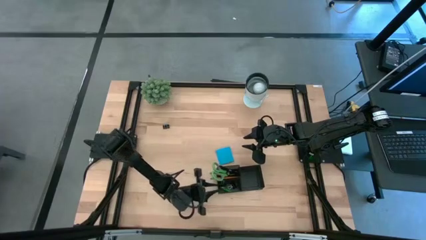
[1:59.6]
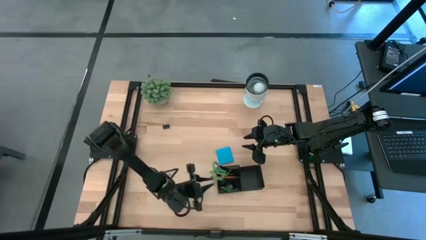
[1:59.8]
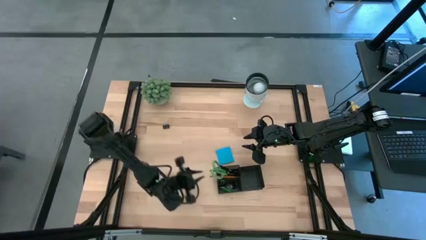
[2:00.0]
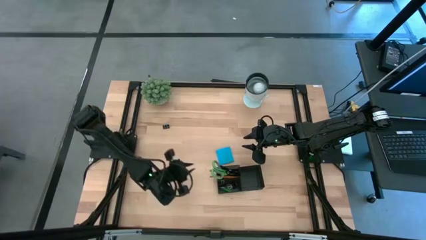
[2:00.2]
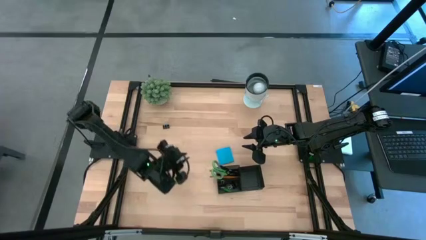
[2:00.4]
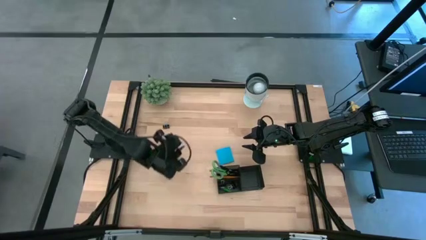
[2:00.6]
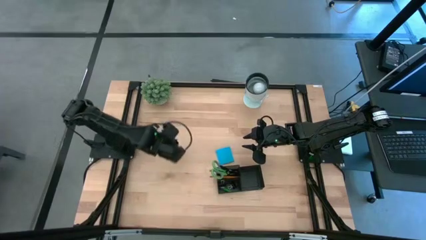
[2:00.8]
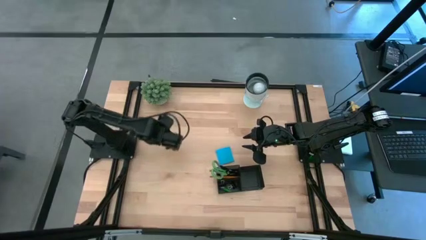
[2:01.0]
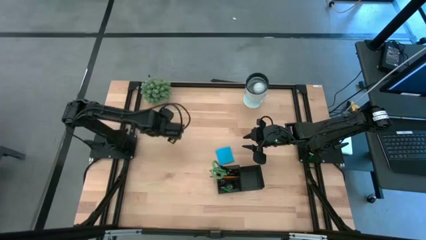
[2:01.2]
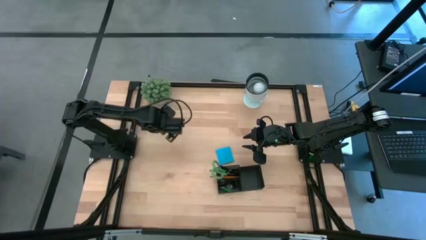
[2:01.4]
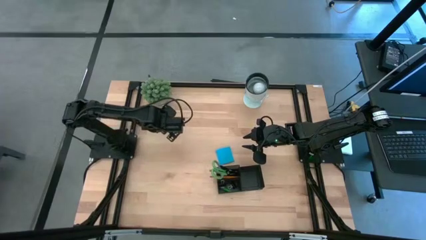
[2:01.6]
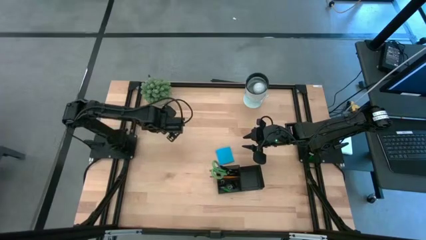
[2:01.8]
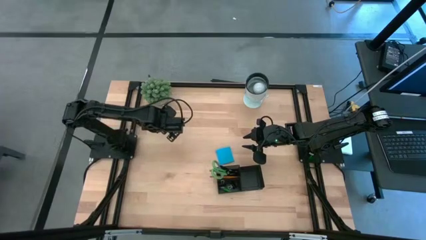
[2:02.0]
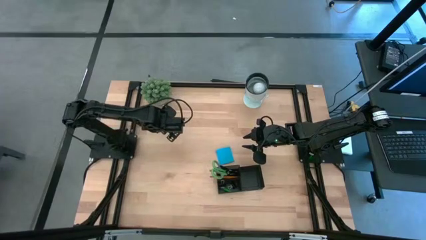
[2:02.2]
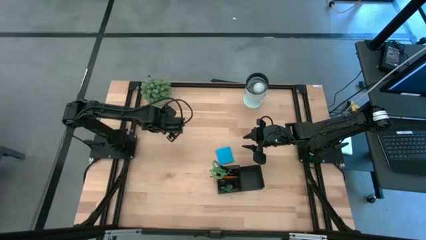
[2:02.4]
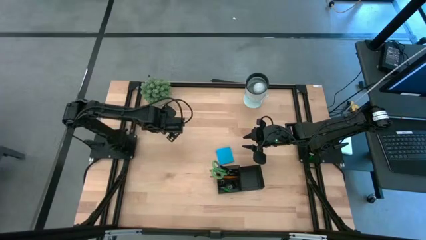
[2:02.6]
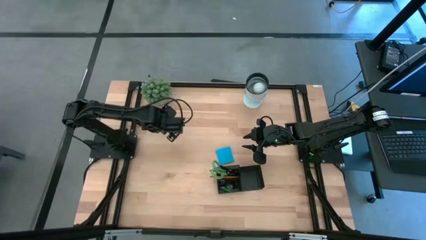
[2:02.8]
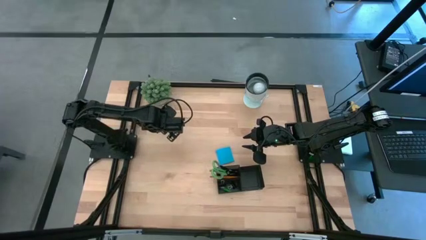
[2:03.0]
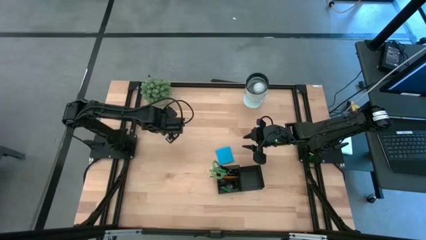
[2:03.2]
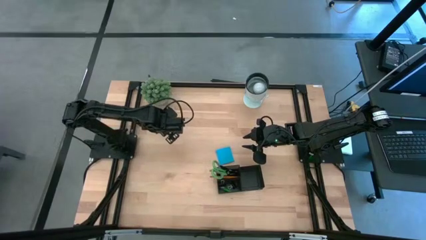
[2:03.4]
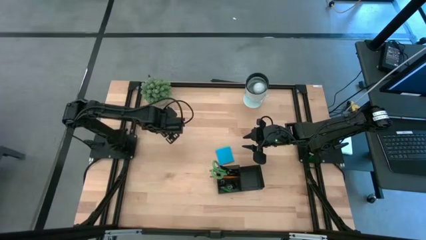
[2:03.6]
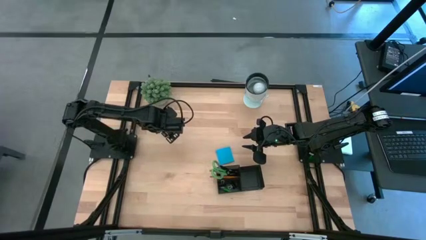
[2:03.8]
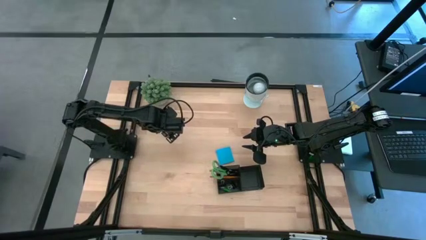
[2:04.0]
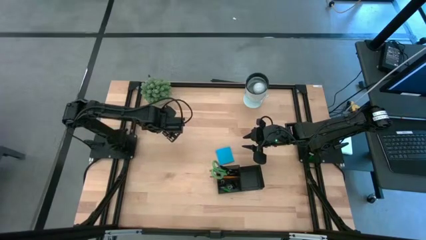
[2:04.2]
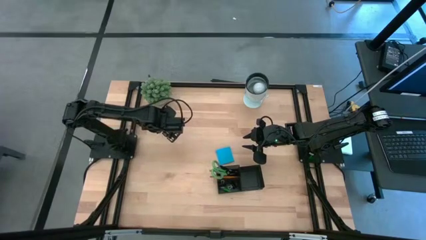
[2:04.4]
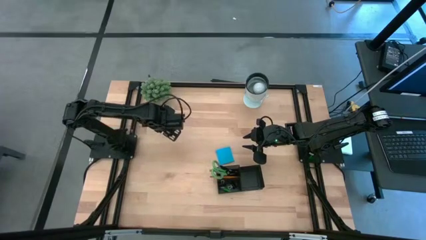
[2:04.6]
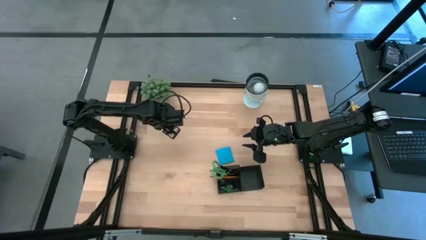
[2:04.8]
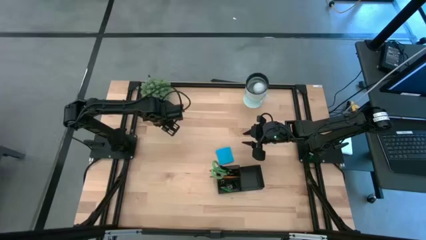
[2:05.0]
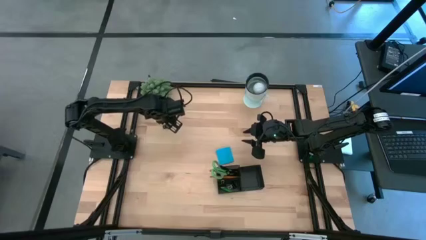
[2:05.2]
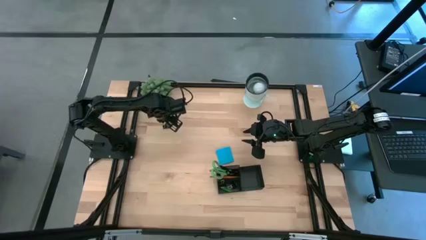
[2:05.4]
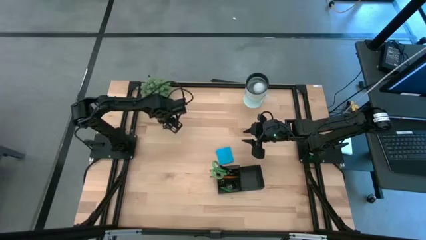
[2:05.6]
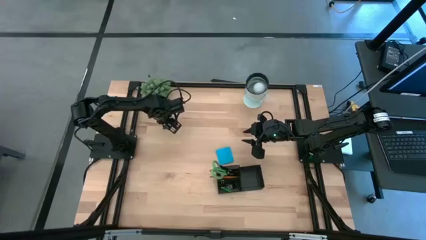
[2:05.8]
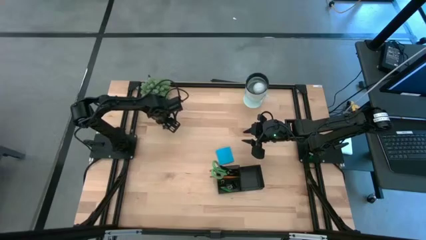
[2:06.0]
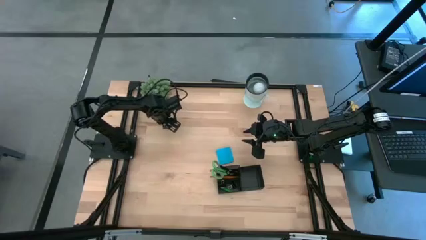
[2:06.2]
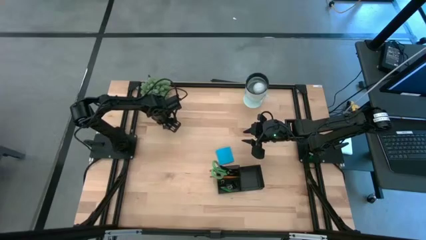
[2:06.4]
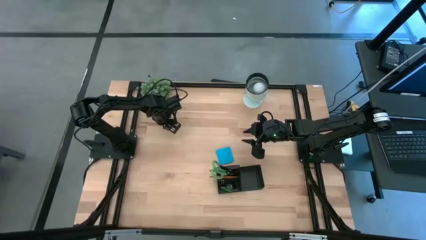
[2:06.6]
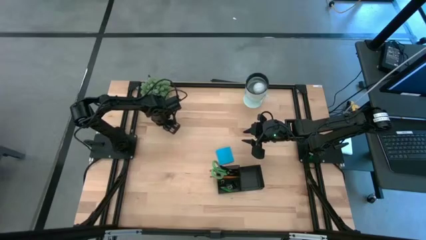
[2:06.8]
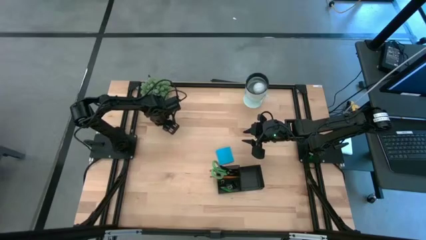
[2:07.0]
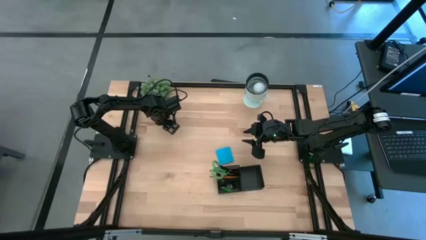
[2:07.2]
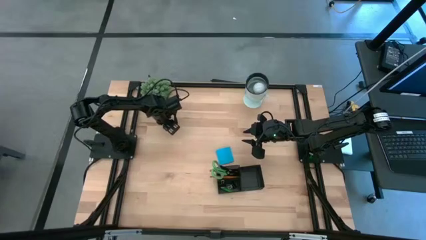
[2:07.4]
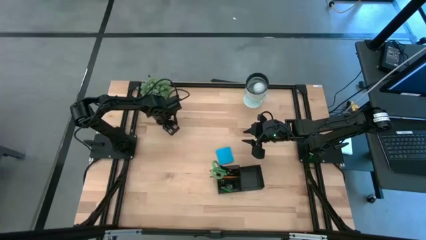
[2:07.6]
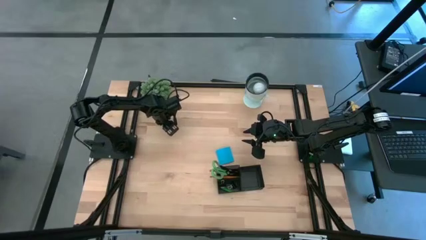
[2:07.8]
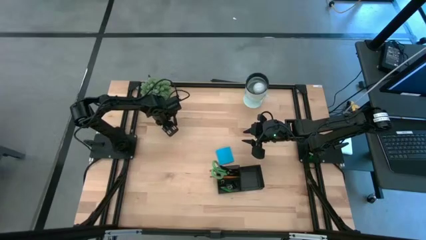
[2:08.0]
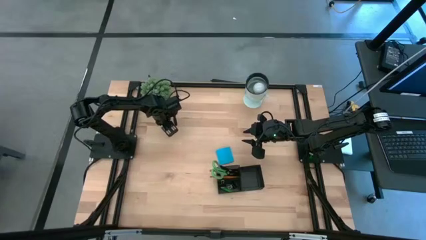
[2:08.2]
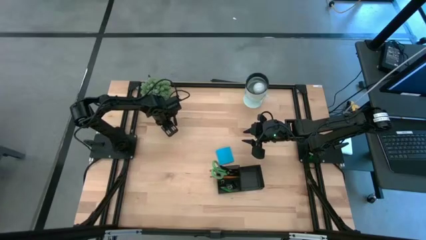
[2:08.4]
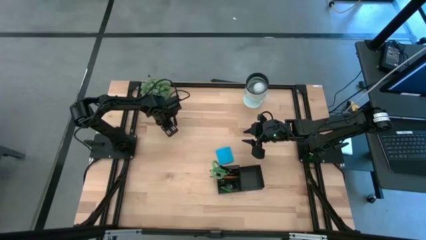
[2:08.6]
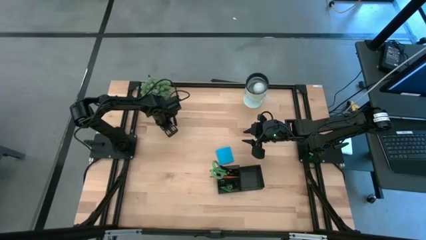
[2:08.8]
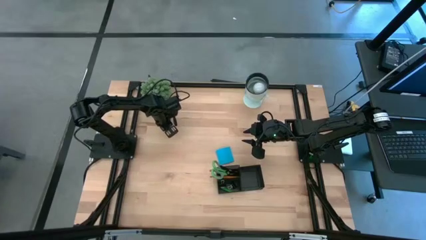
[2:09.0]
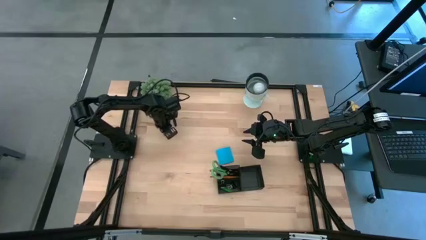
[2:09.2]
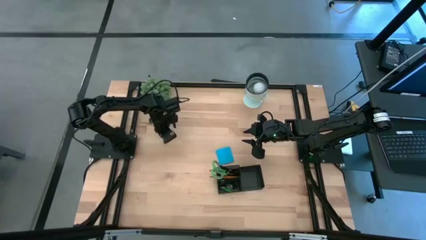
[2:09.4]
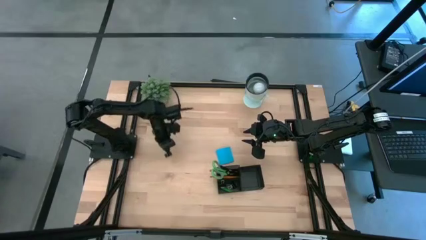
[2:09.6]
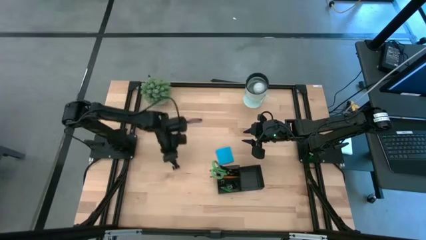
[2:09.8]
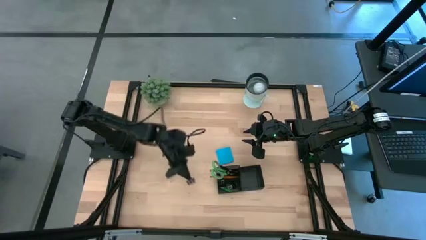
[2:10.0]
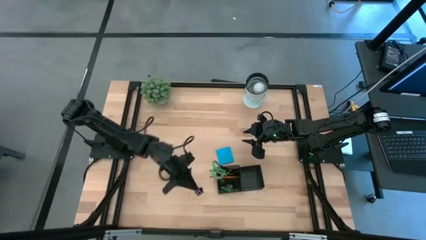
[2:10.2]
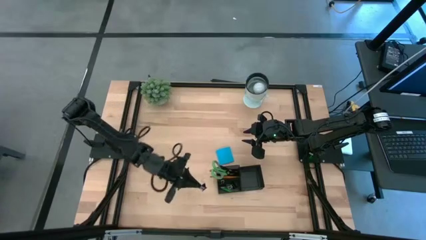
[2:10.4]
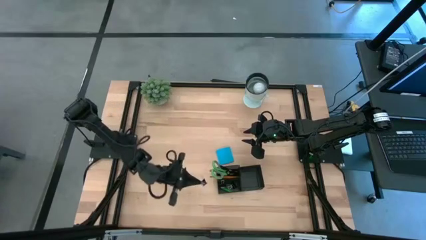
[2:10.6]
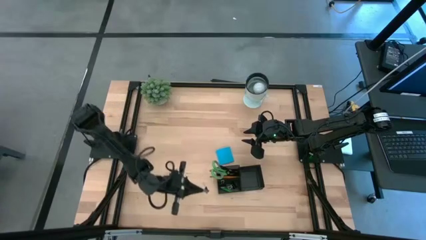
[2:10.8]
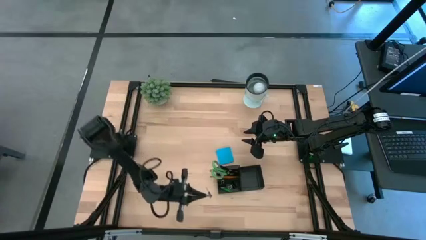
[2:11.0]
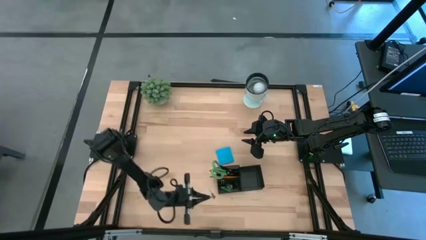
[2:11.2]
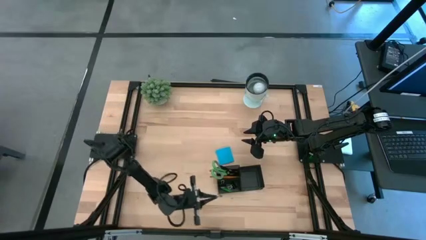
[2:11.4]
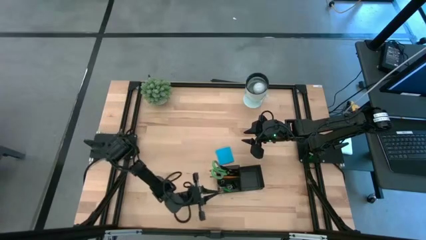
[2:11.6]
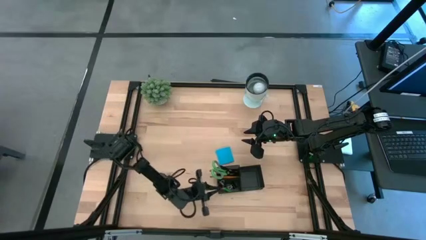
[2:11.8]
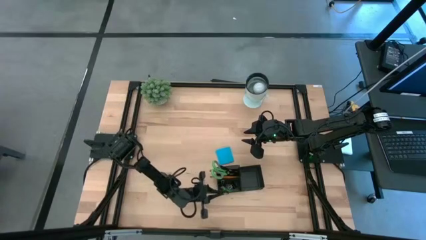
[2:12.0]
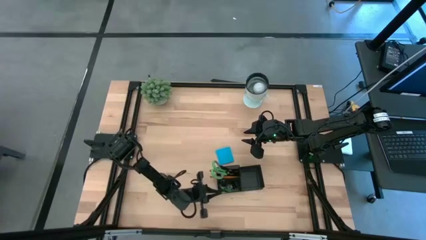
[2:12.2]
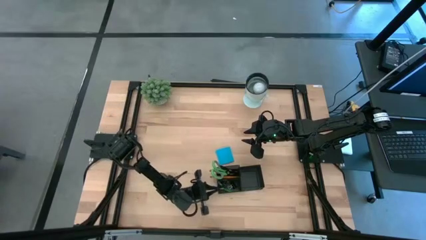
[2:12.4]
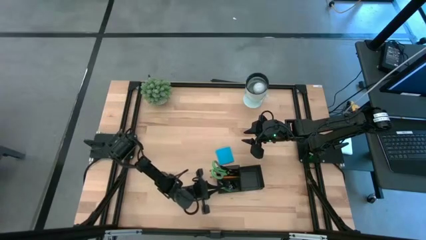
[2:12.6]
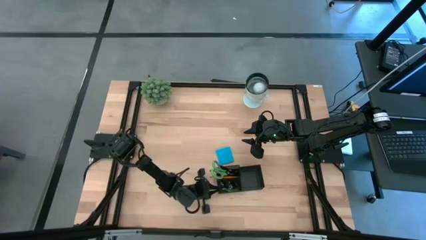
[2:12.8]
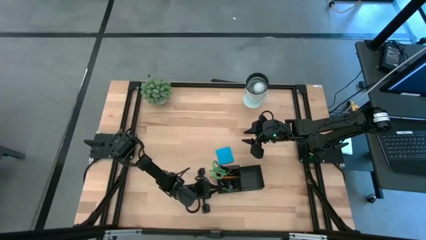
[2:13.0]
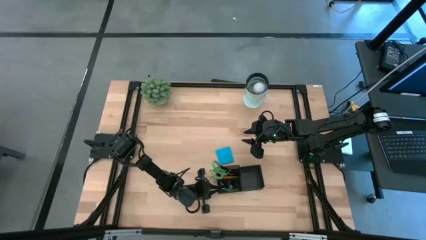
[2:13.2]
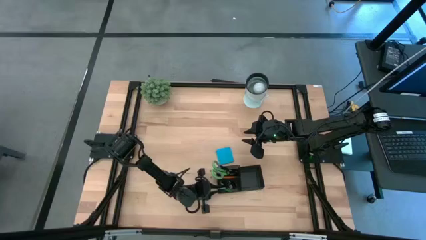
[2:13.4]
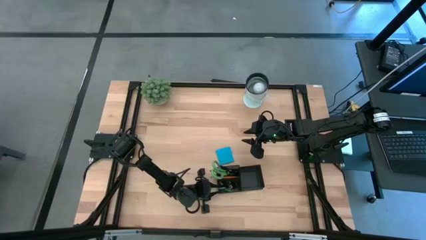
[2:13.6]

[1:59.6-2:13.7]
Task: Pick and place office supplies into organizer
Put the binder clip into the bottom left slot of the desk organizer

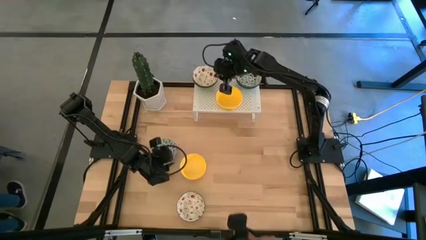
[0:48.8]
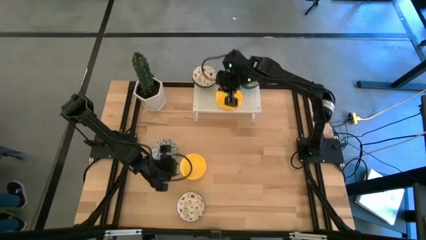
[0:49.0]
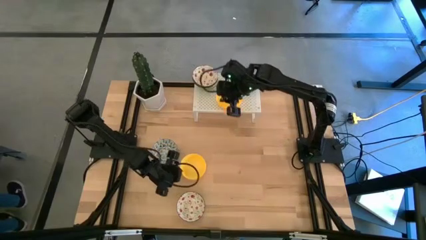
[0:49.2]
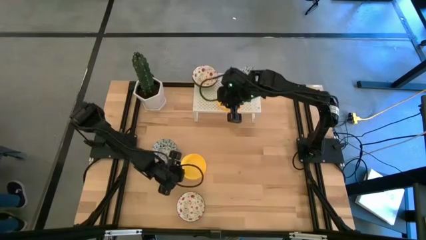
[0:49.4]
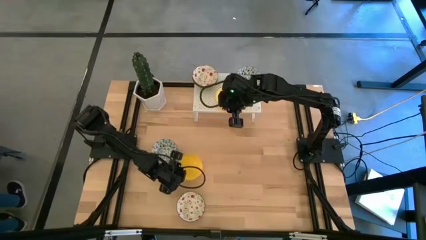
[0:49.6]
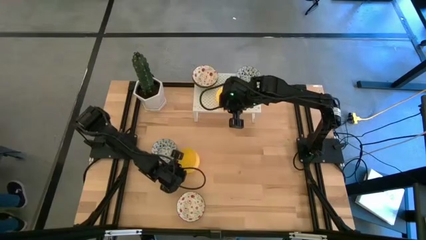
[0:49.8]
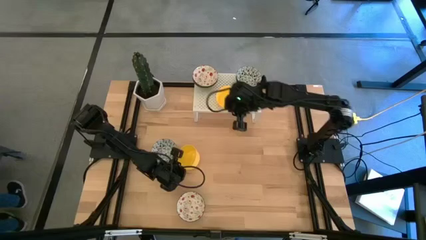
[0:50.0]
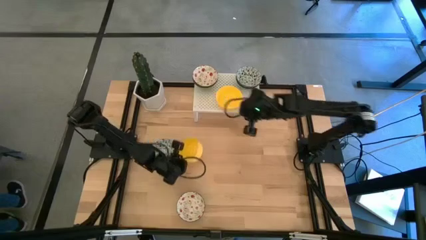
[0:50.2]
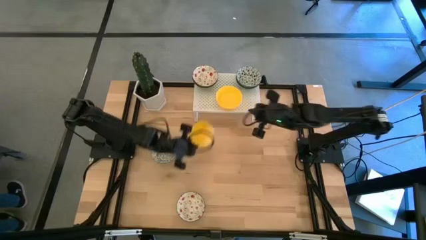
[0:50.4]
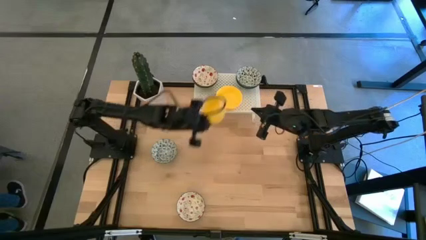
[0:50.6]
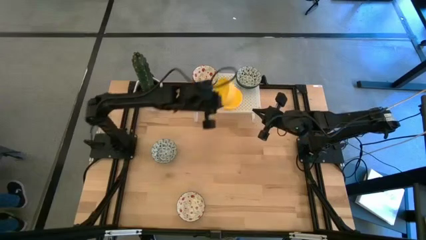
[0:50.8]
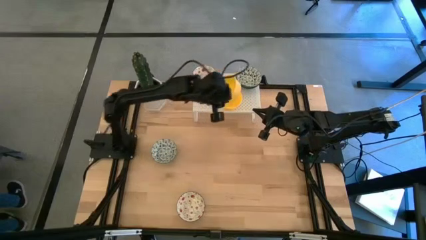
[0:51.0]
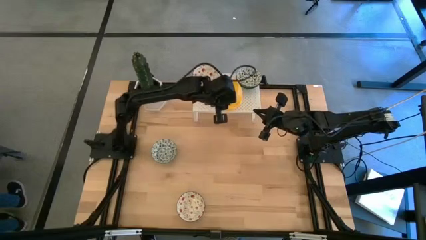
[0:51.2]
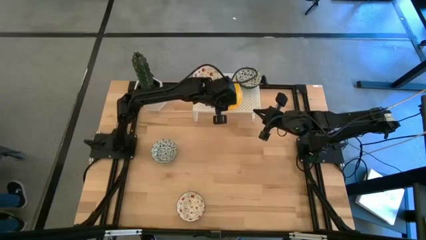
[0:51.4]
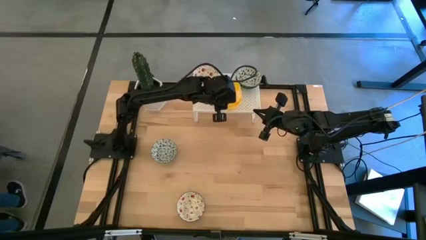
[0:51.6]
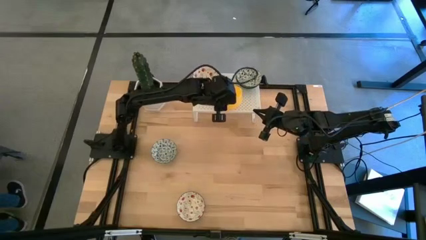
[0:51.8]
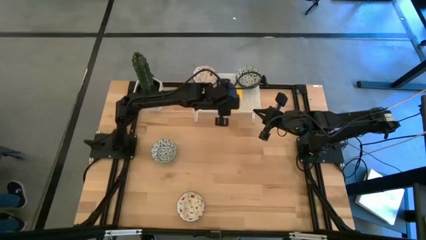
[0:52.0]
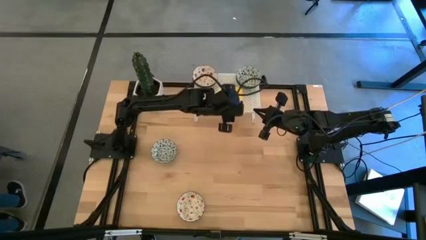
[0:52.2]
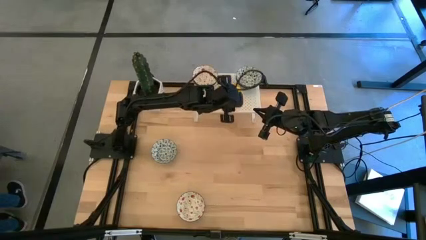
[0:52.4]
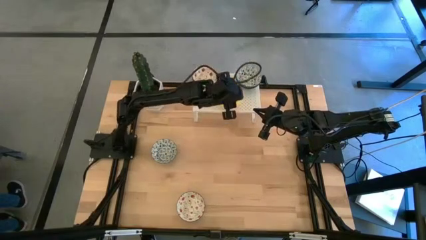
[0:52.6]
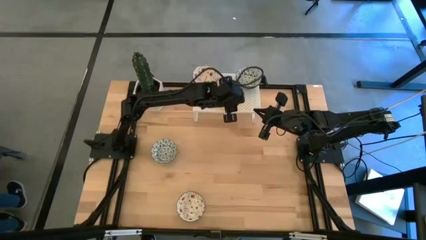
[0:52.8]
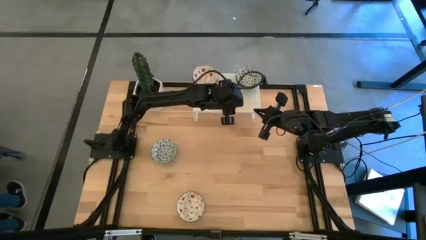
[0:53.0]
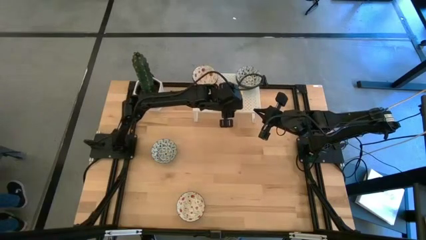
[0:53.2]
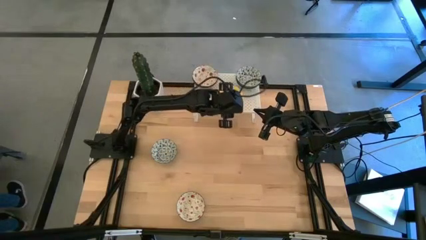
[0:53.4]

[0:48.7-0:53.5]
Task: Pick & Place Mini bowls
Stack the yellow bowl on top of the other yellow bowls on the shelf
